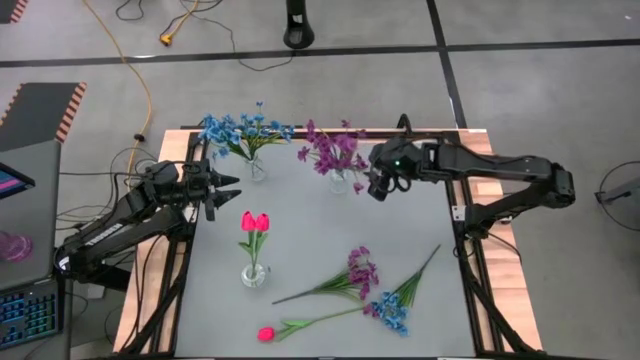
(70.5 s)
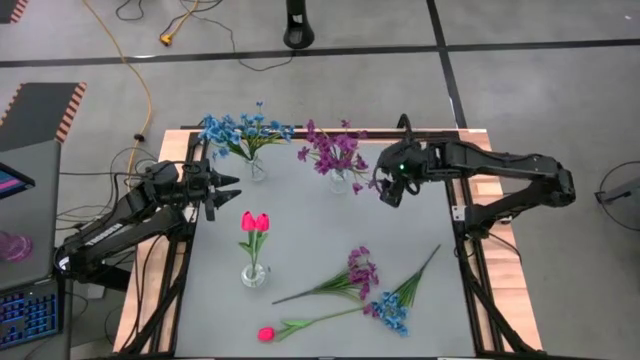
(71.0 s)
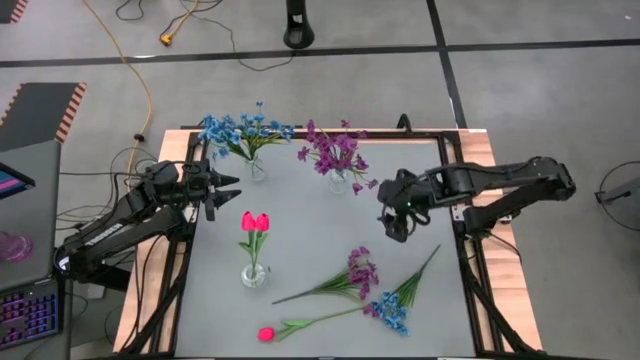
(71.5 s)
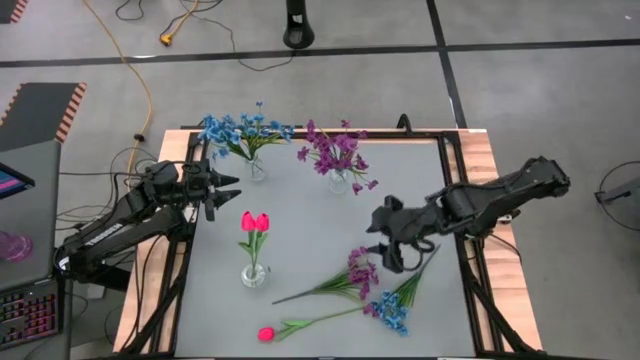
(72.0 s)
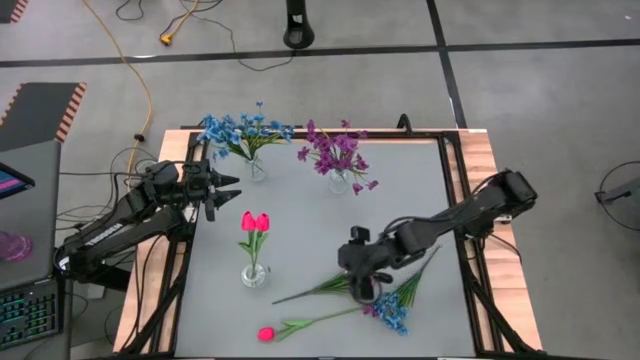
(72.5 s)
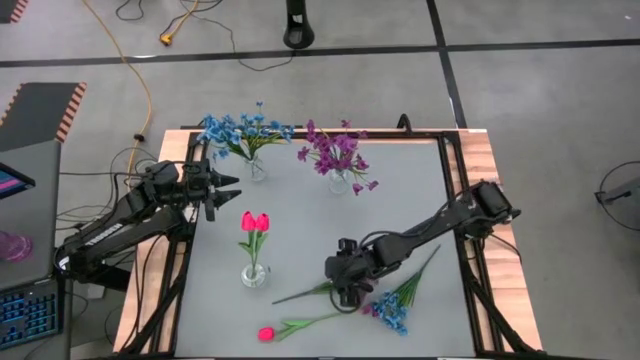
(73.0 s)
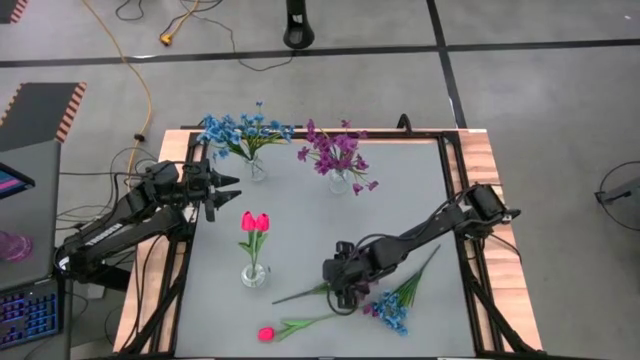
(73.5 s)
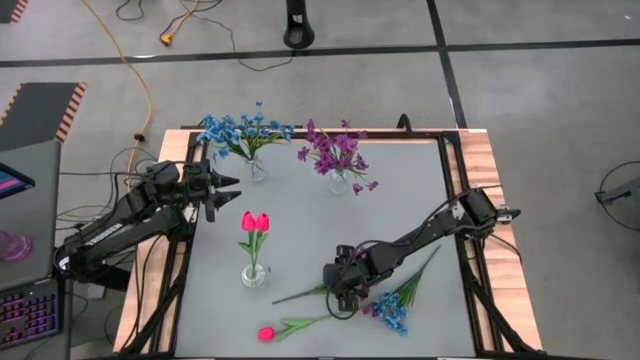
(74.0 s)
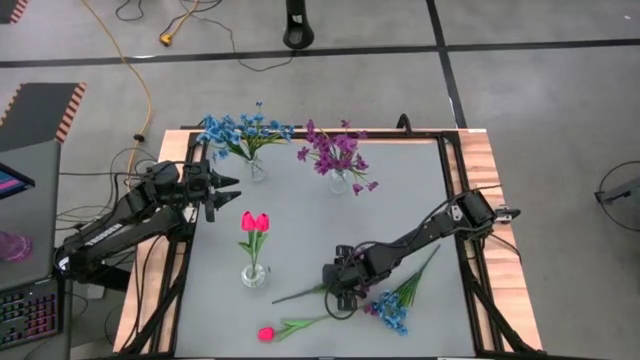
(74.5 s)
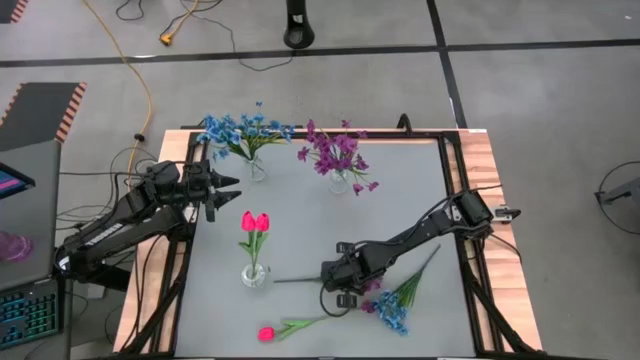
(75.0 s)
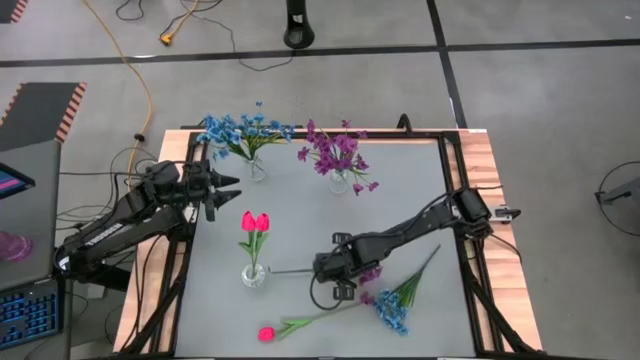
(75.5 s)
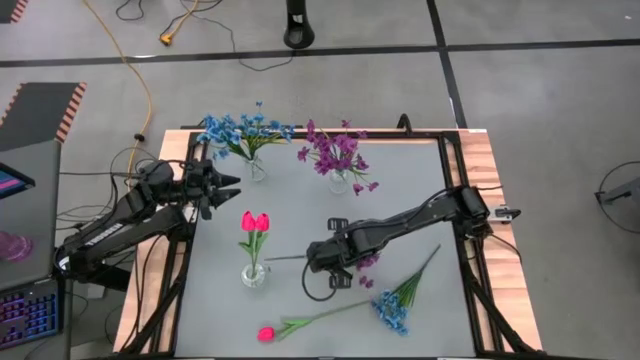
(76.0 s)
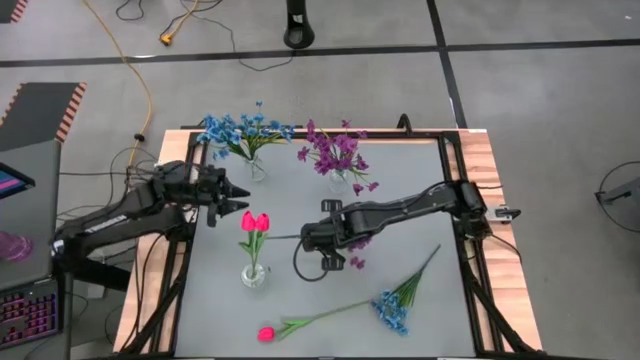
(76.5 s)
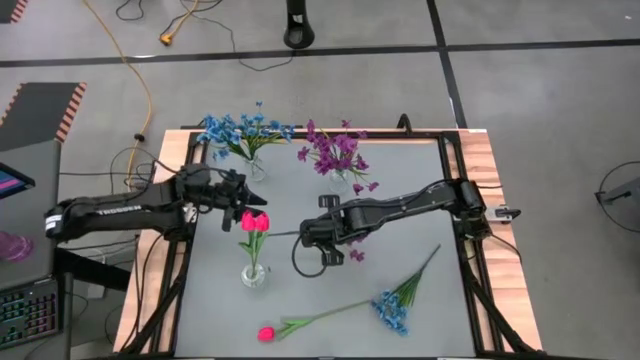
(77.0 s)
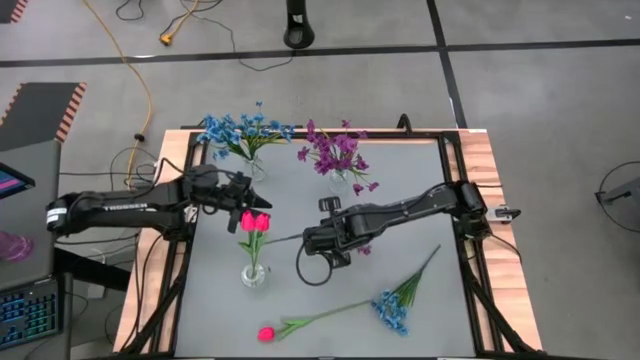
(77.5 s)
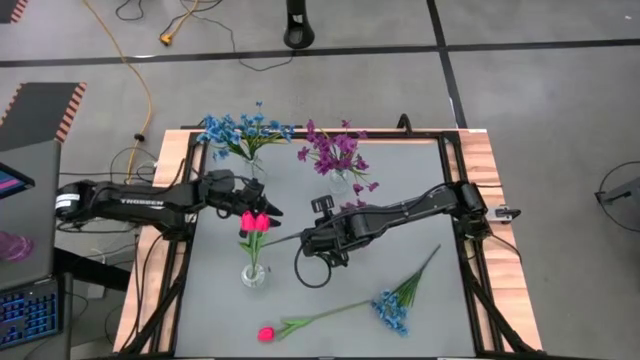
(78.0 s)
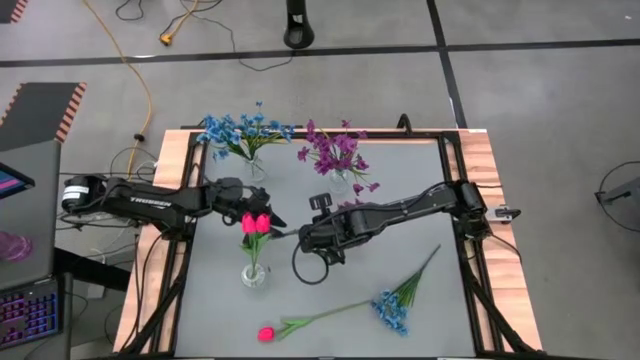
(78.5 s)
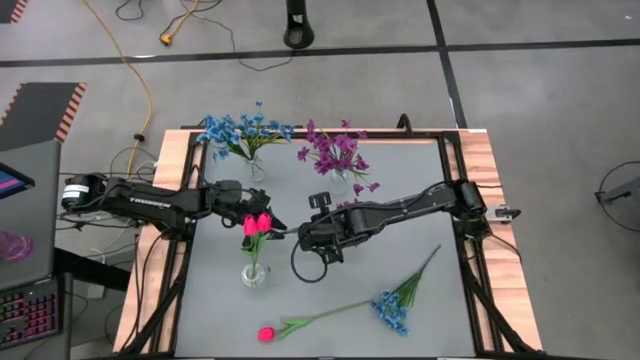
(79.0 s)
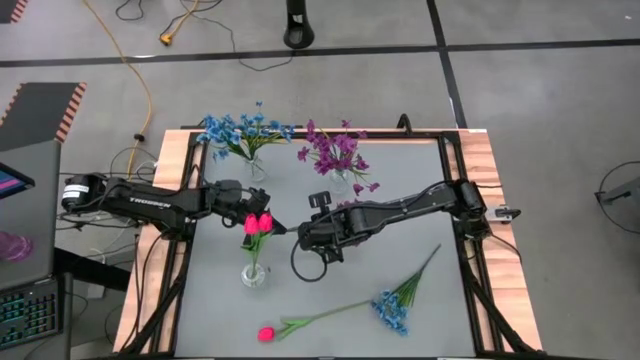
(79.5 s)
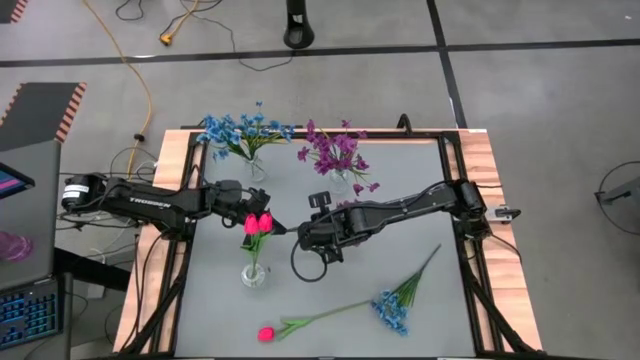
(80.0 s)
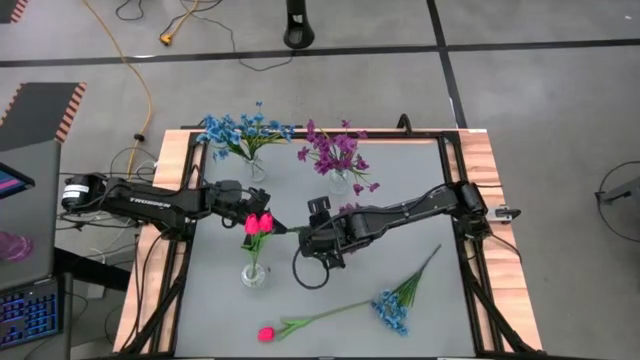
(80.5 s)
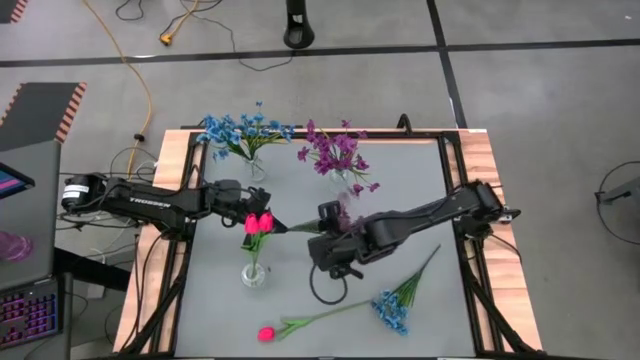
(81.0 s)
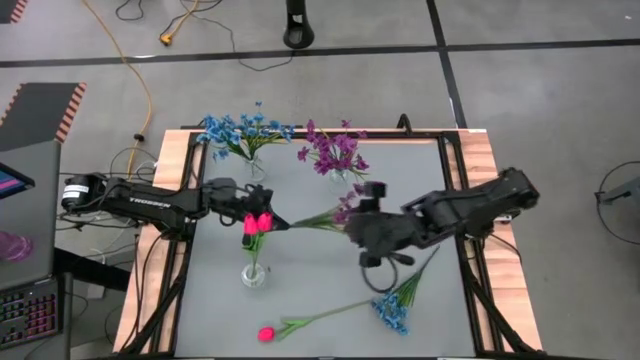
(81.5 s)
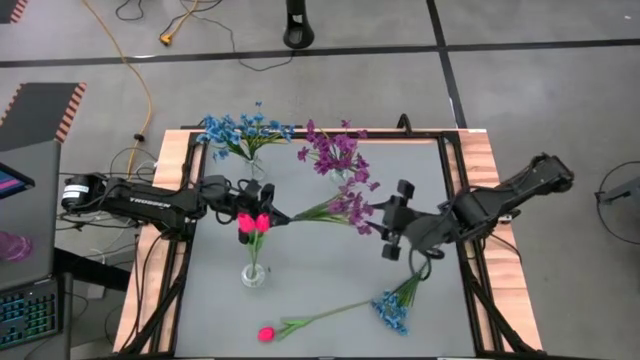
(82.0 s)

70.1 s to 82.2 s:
Task: Sort flowers into vase by color
Put the violet flower into the top right transparent vase

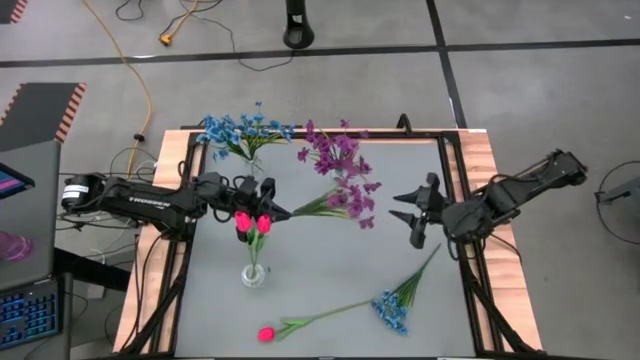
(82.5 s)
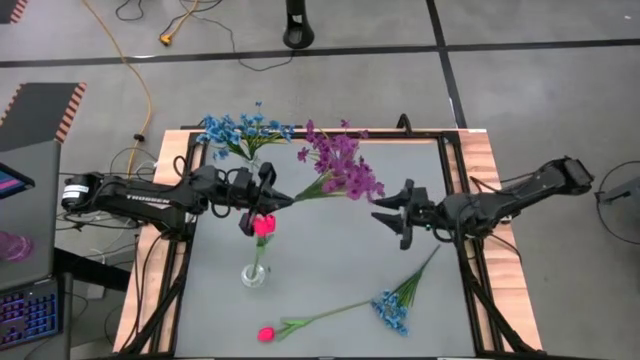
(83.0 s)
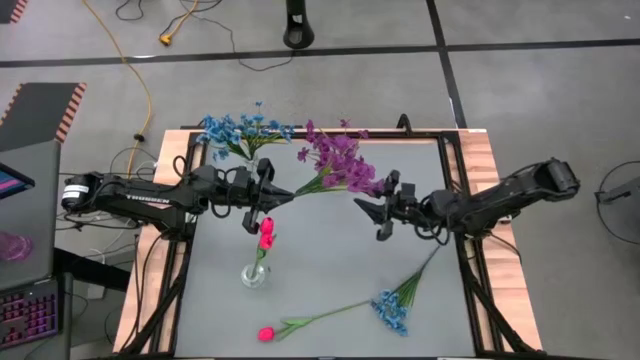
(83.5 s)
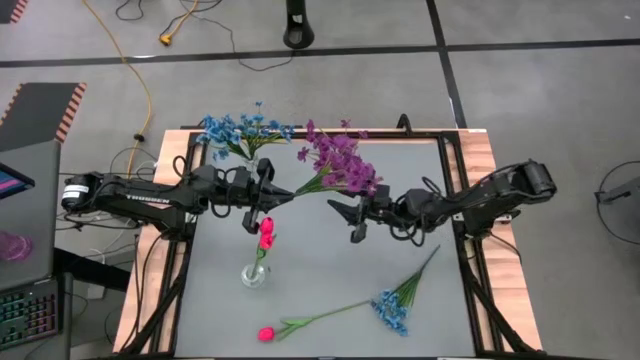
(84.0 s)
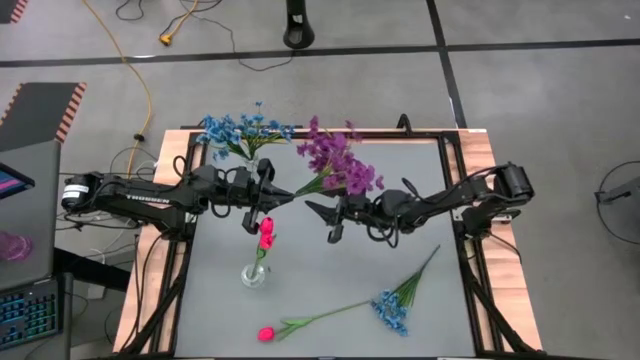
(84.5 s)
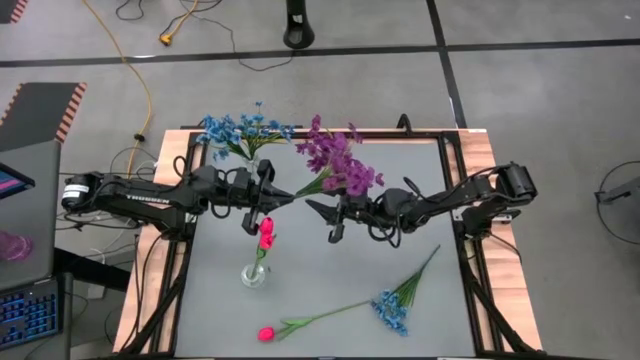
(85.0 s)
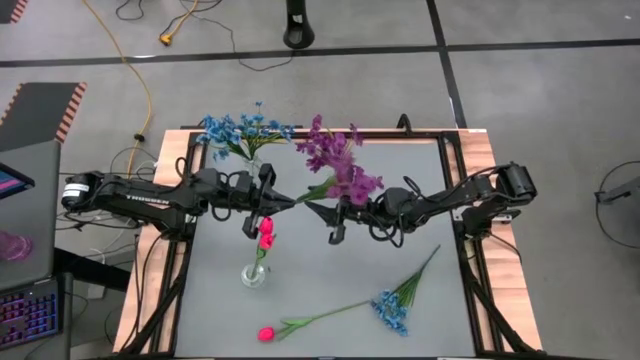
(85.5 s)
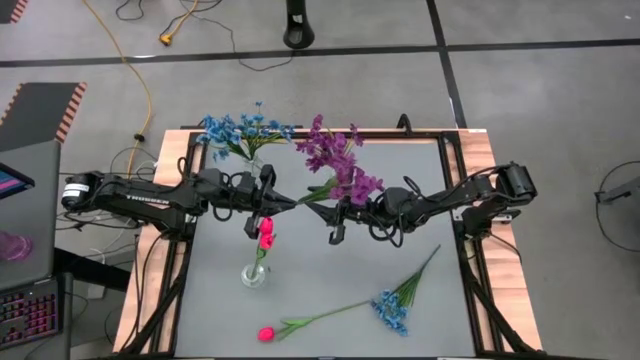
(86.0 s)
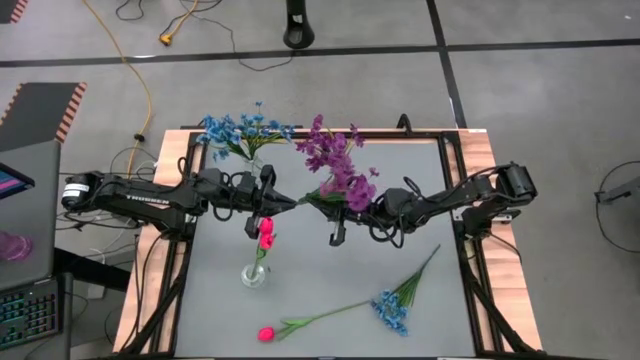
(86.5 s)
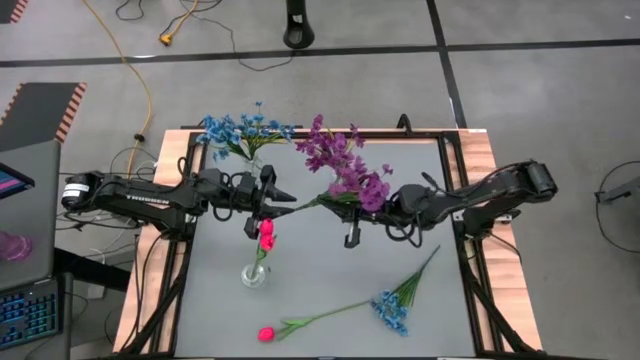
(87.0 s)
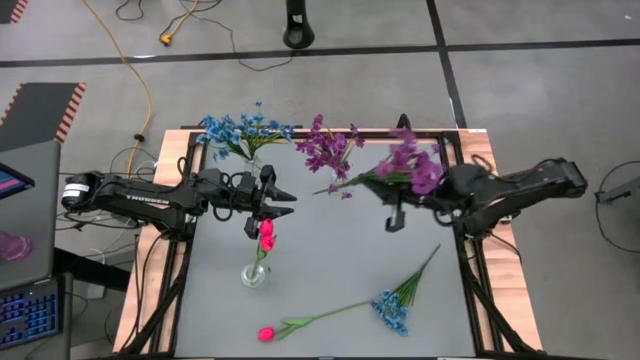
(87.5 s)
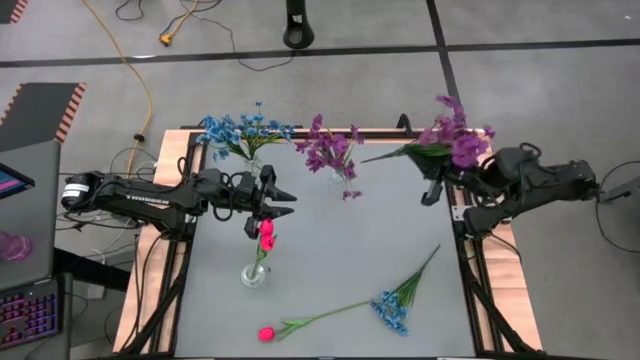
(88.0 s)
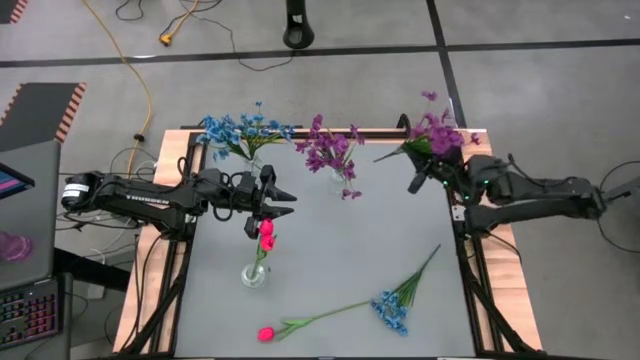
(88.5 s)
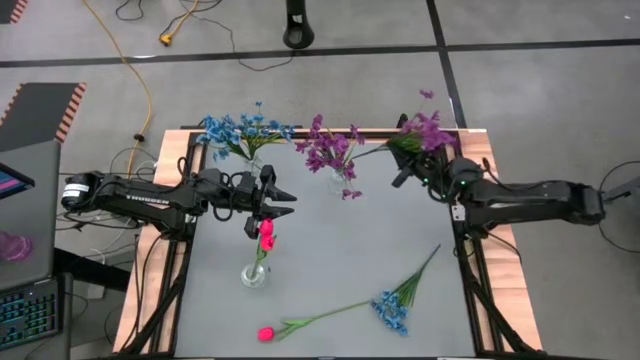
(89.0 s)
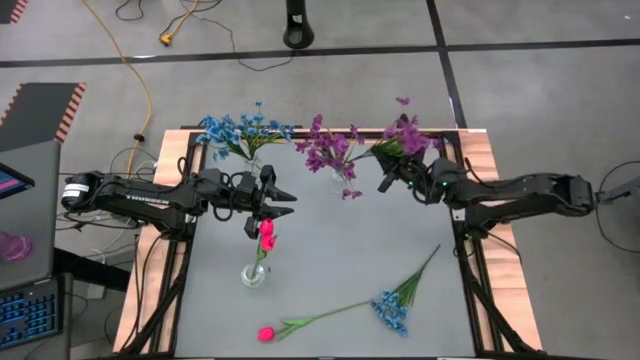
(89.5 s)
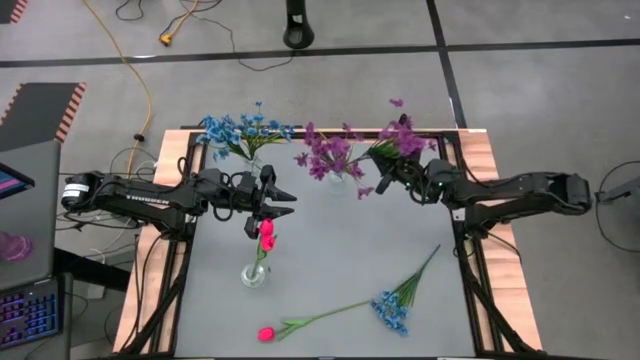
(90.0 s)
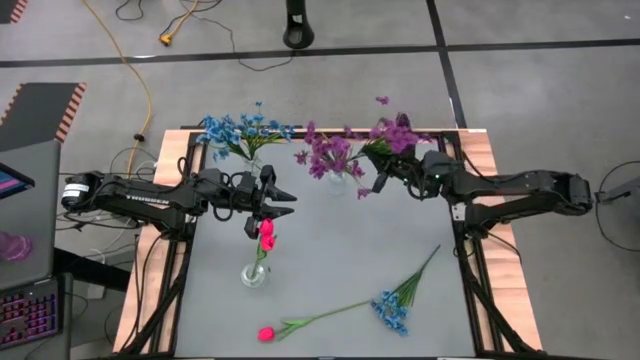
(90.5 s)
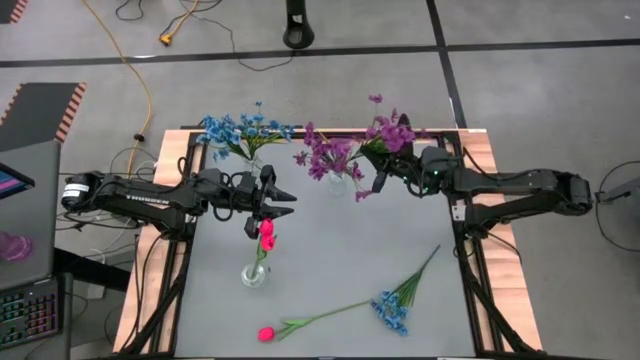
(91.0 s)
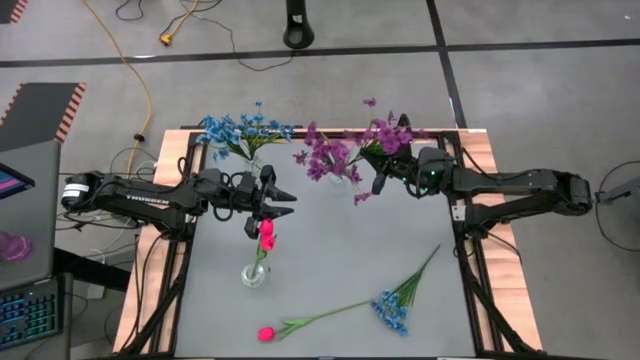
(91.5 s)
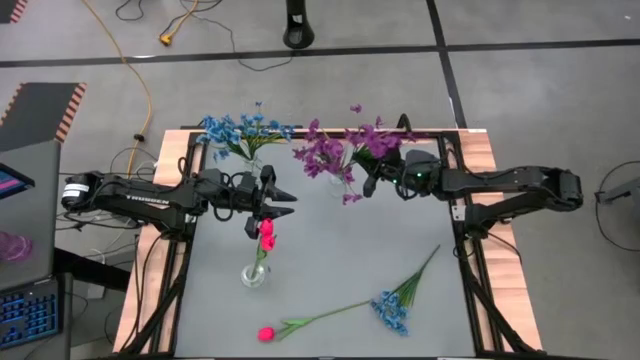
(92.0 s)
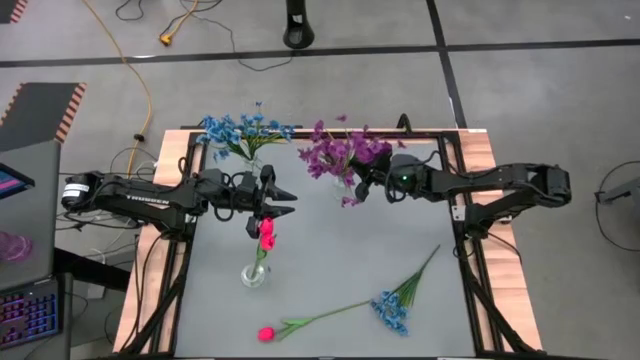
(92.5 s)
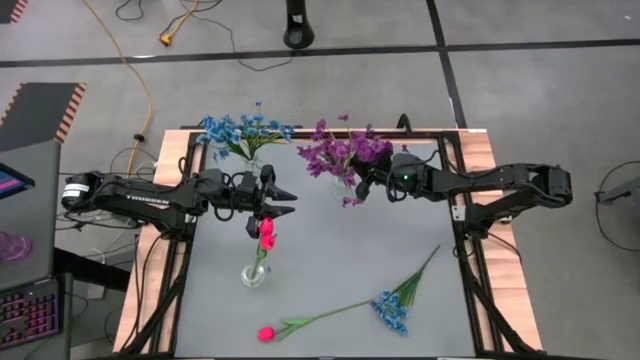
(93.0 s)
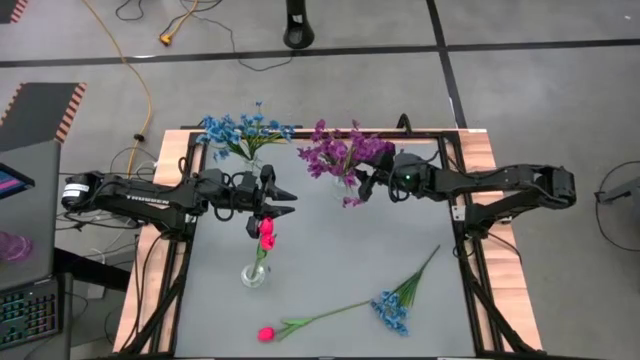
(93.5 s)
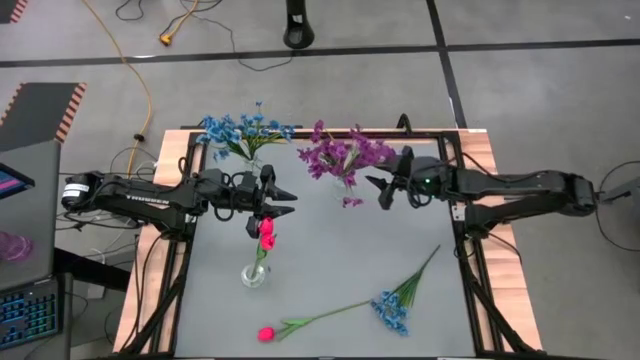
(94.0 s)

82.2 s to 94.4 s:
Put the violet flower into the top right transparent vase
